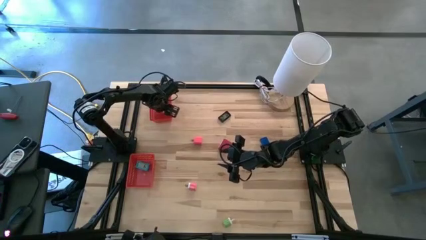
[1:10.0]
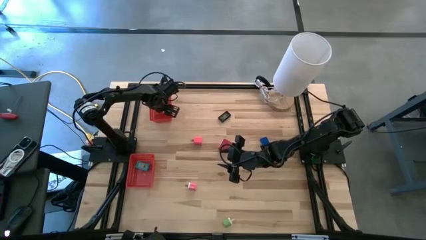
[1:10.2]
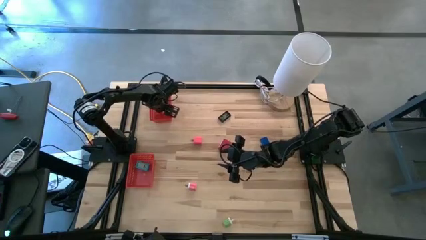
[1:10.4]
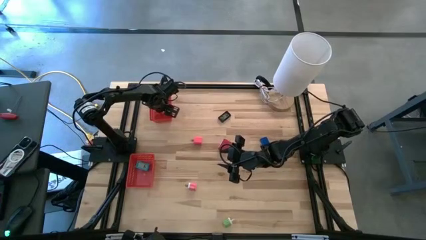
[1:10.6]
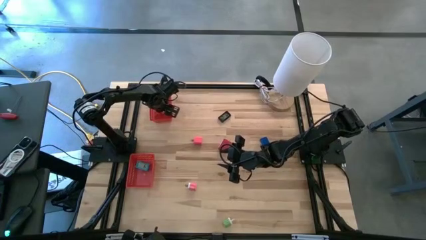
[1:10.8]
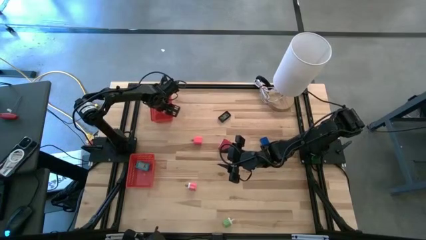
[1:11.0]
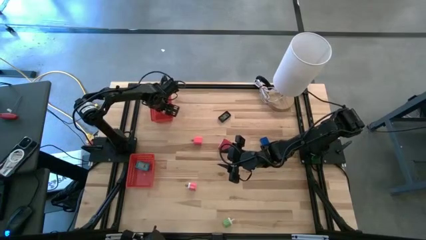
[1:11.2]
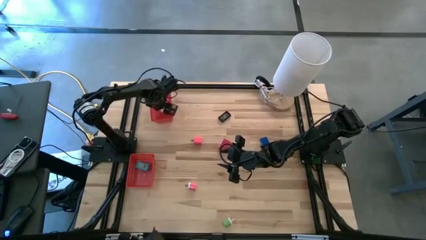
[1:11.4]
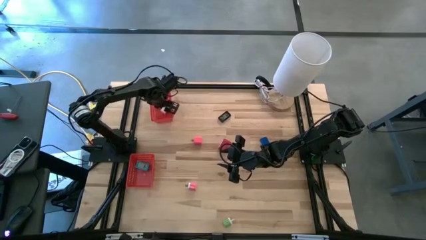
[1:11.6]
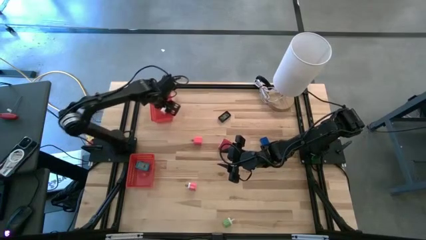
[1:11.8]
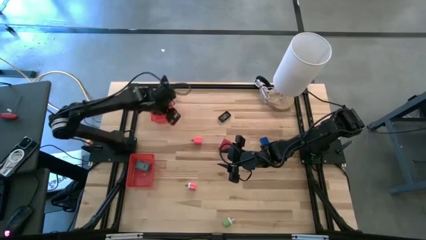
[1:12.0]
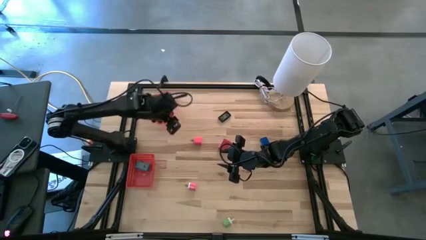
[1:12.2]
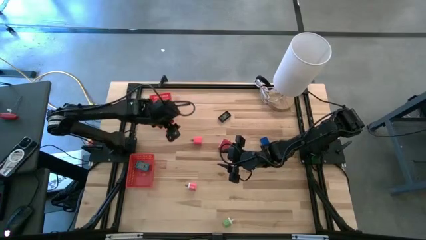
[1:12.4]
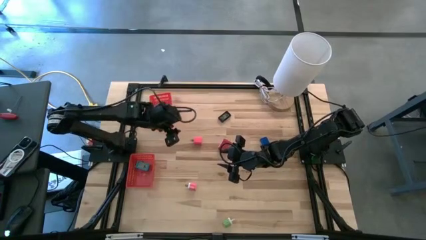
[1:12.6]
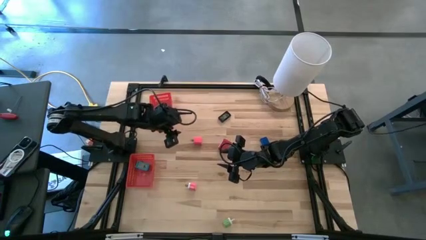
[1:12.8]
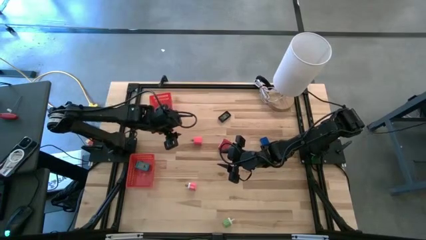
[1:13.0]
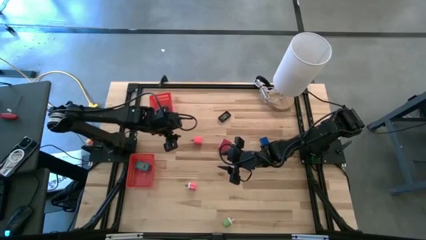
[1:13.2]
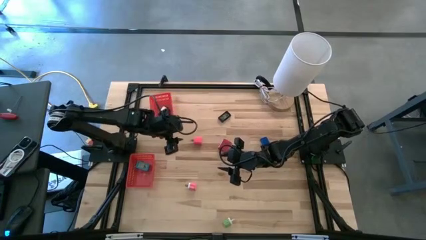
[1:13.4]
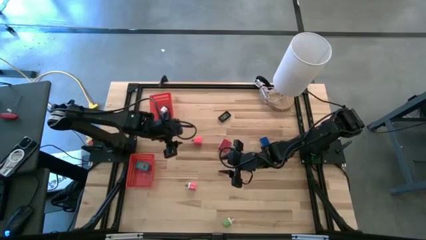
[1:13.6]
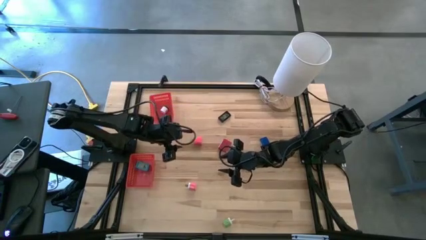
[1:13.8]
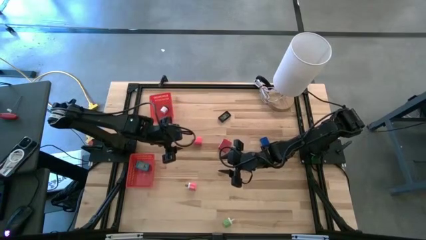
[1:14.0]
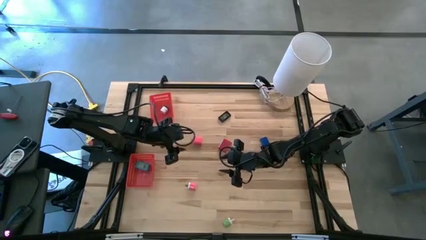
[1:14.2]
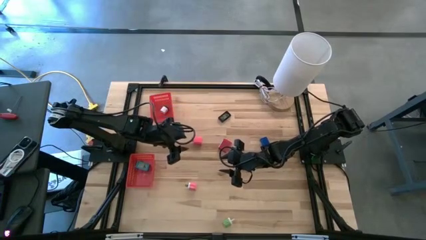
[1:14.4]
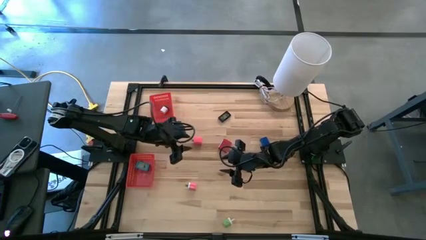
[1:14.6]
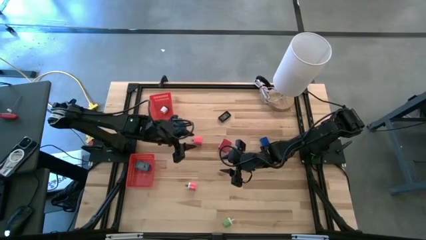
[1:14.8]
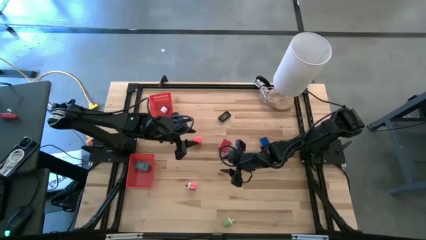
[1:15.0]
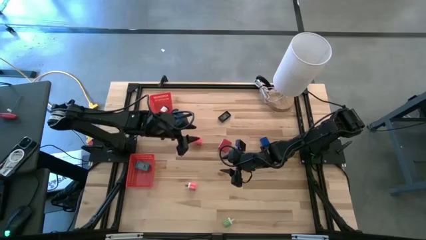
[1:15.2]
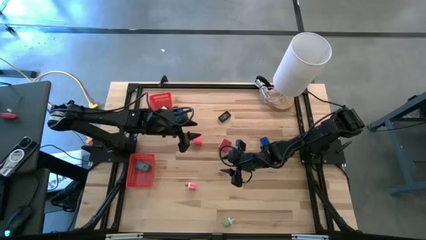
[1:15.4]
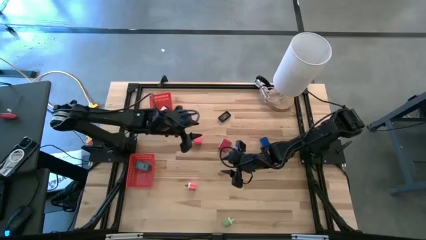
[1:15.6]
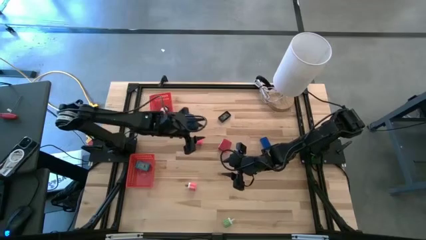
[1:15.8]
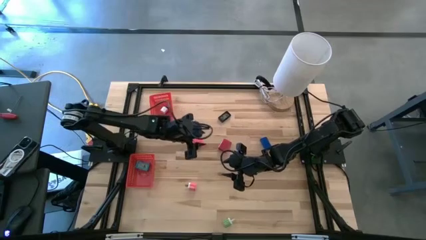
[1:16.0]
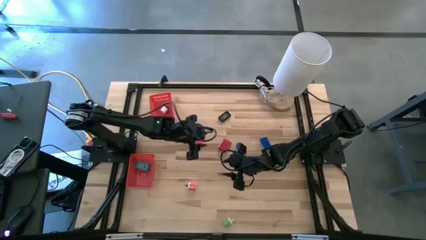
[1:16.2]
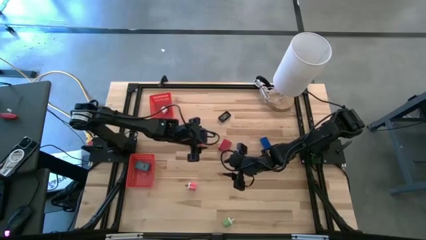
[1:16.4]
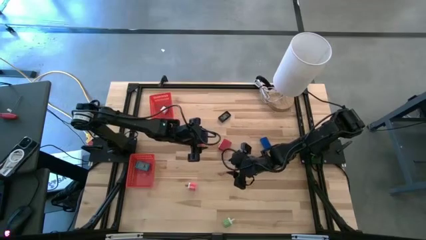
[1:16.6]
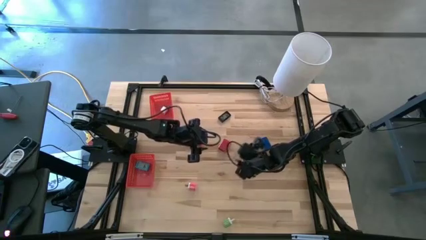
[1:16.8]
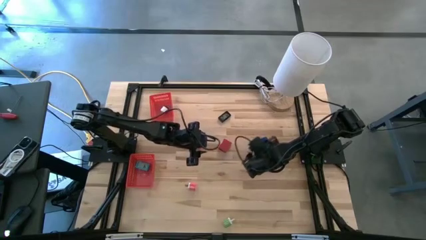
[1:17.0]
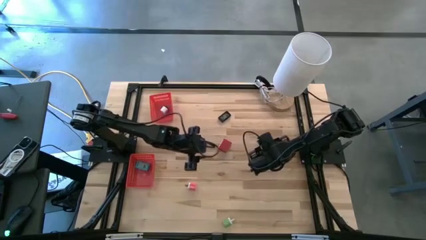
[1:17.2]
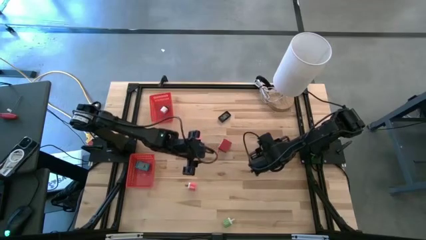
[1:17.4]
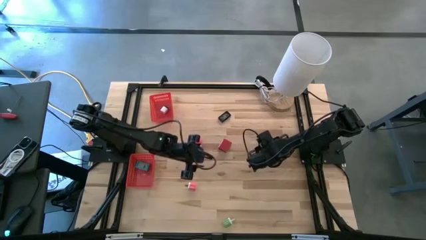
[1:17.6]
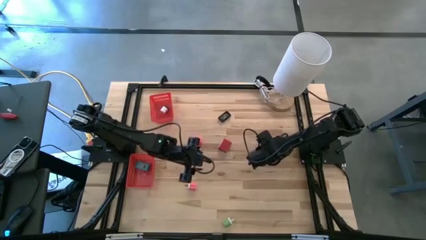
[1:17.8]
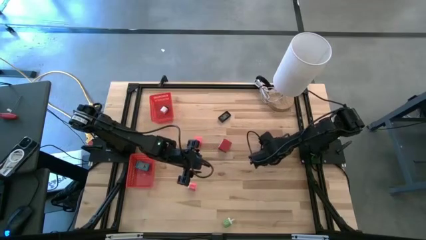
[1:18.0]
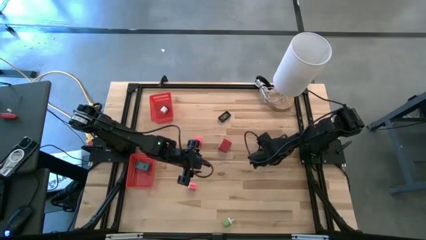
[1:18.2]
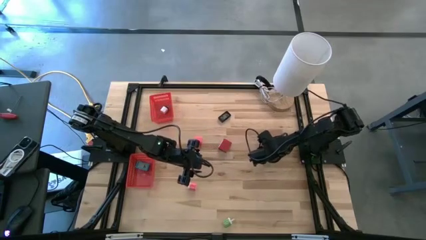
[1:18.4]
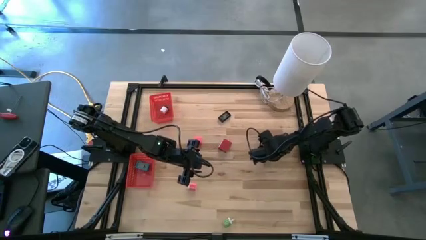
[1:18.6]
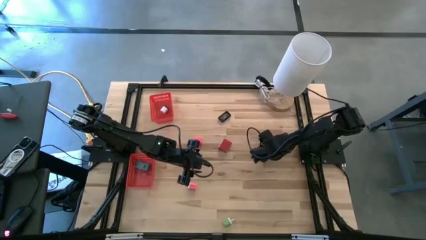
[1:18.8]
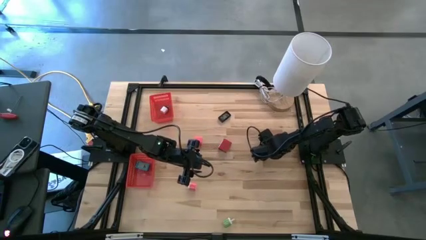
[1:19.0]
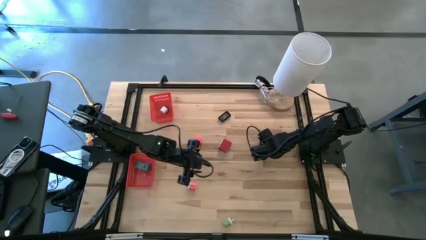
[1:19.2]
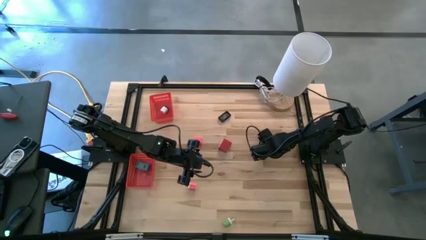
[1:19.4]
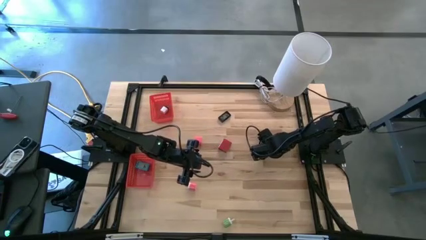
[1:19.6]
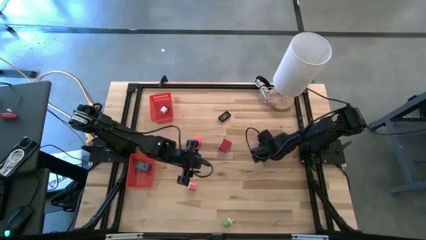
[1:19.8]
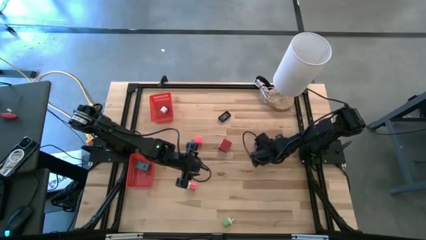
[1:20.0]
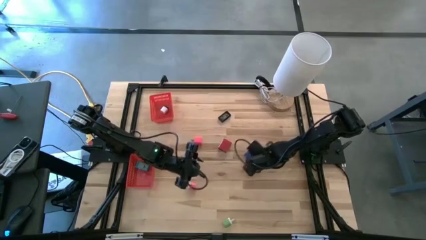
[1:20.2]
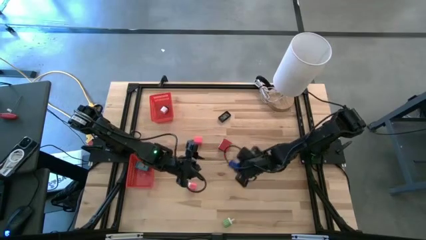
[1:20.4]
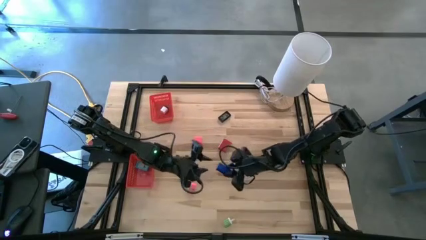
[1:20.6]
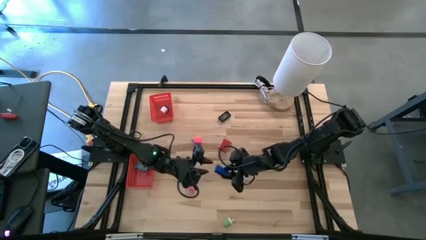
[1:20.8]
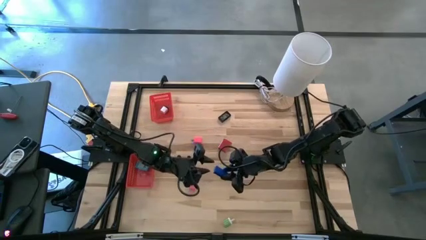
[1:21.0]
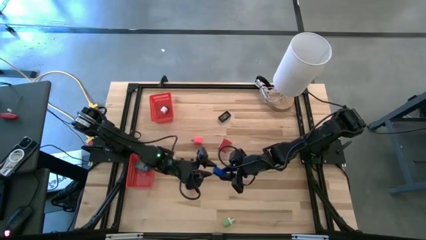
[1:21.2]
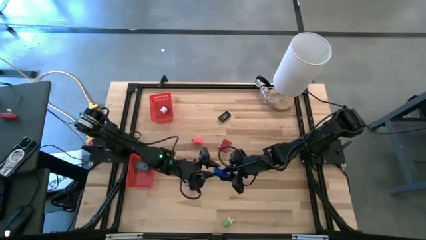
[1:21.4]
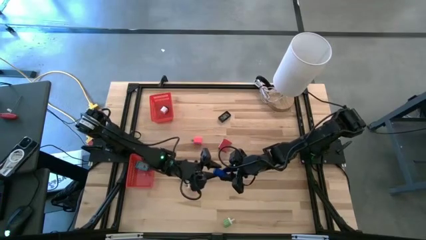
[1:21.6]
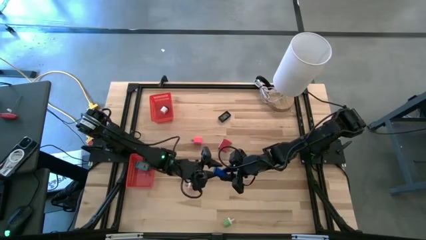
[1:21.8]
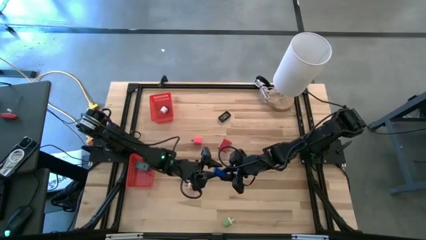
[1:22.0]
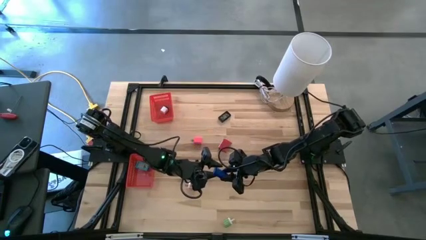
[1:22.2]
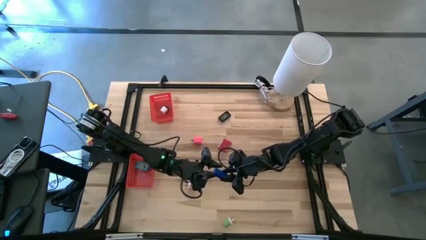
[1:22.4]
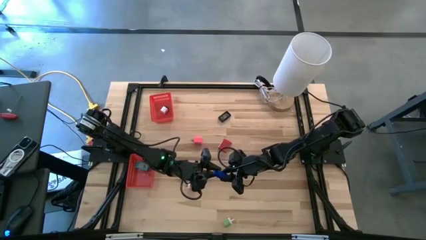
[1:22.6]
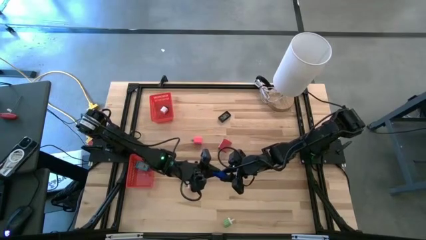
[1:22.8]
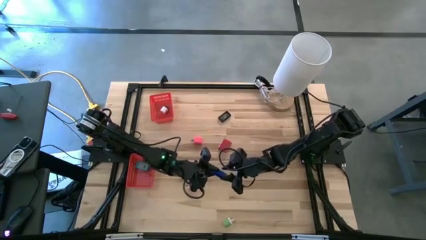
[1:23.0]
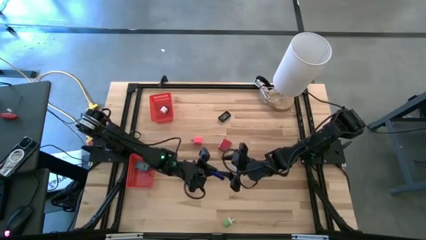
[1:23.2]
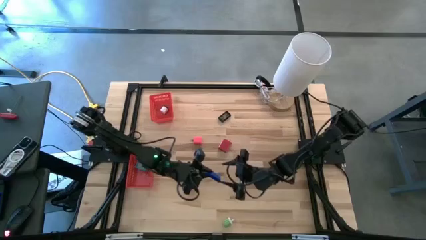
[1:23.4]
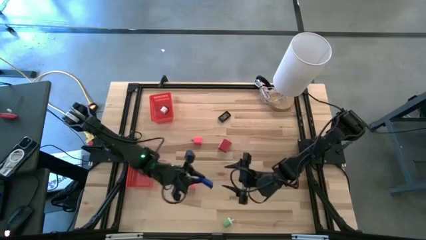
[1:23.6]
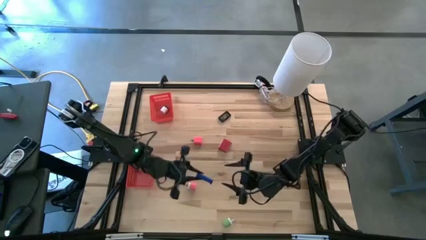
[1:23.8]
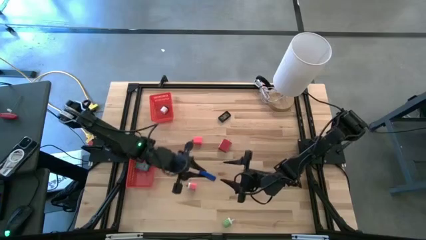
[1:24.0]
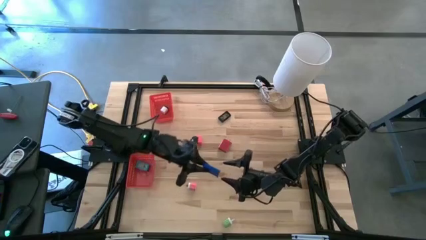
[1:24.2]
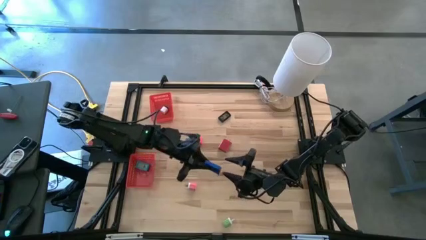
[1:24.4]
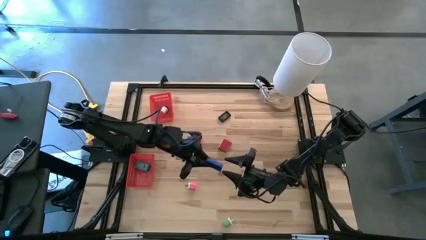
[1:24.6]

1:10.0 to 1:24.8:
Task: Pick & Place Office items
Put the blue digital clock into the bottom red bin
